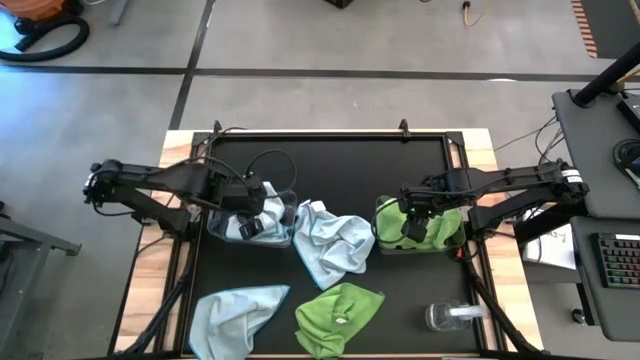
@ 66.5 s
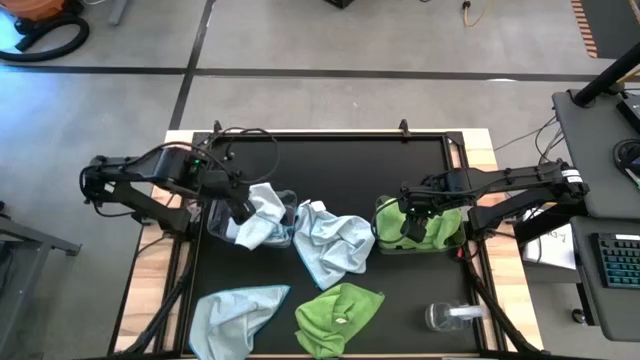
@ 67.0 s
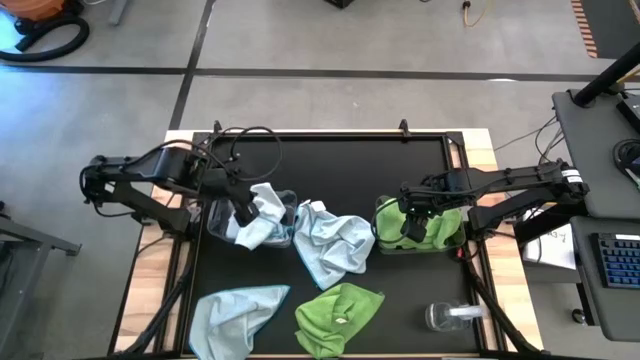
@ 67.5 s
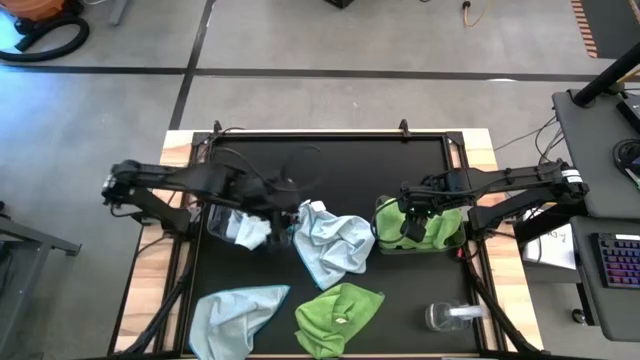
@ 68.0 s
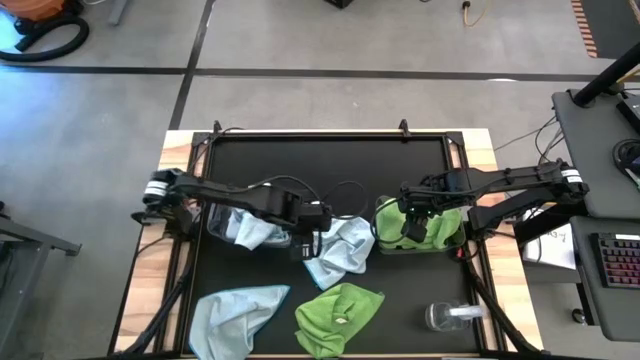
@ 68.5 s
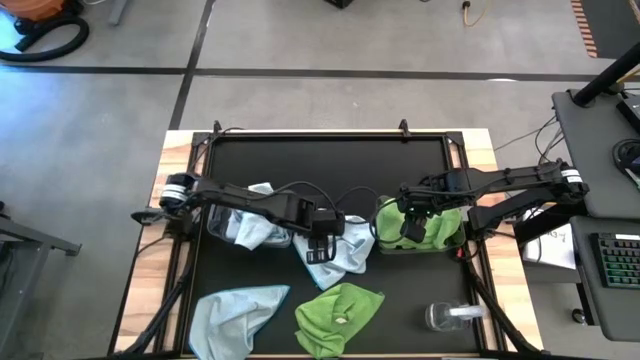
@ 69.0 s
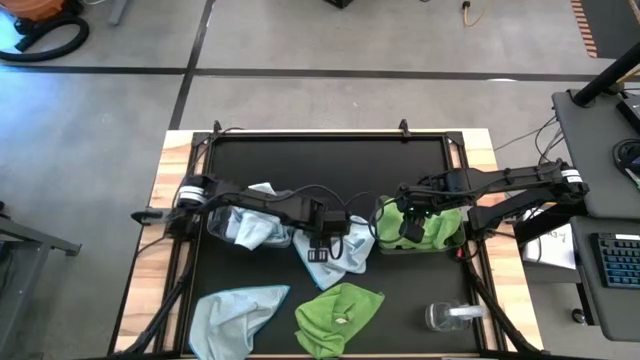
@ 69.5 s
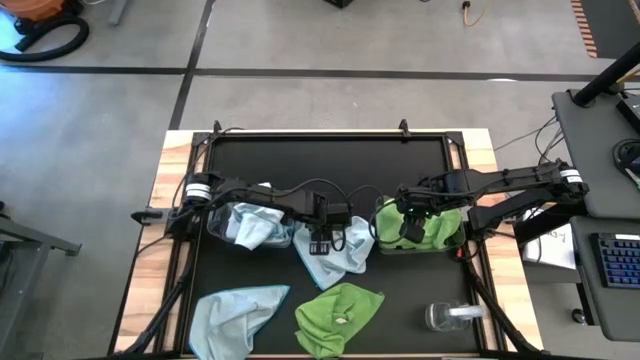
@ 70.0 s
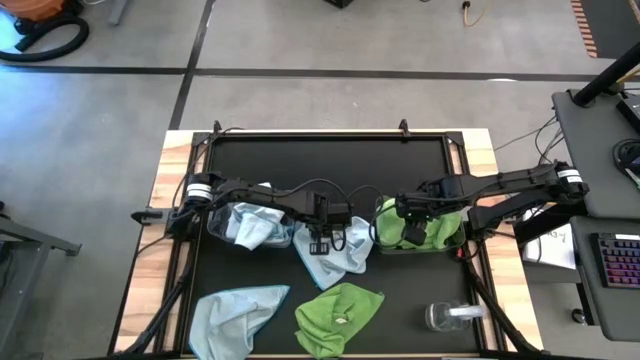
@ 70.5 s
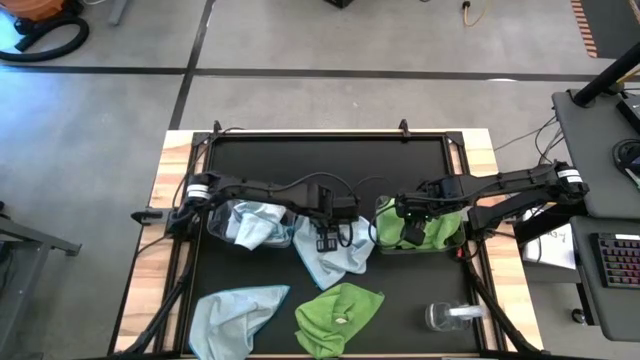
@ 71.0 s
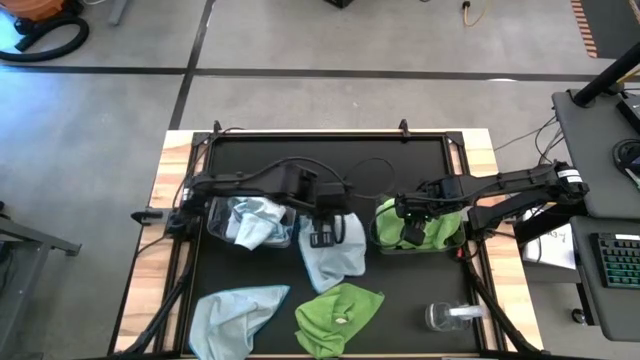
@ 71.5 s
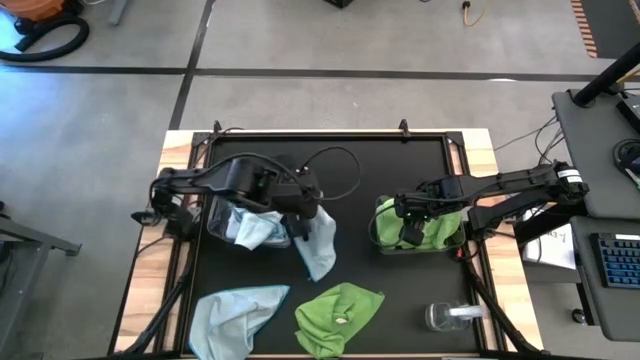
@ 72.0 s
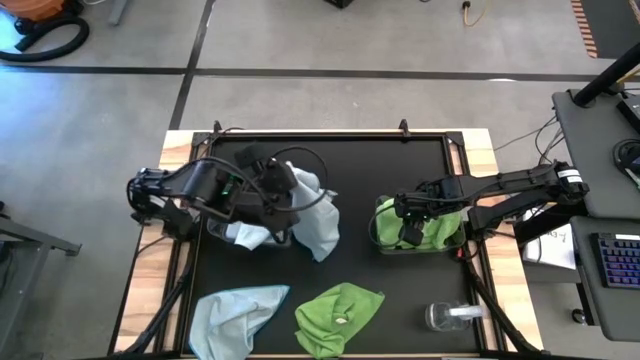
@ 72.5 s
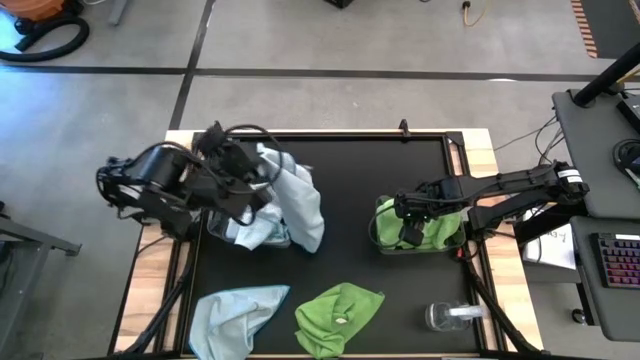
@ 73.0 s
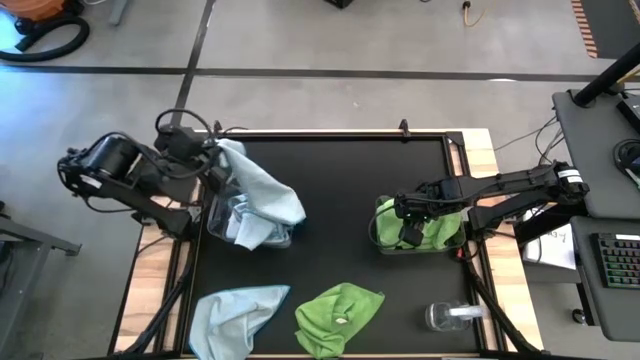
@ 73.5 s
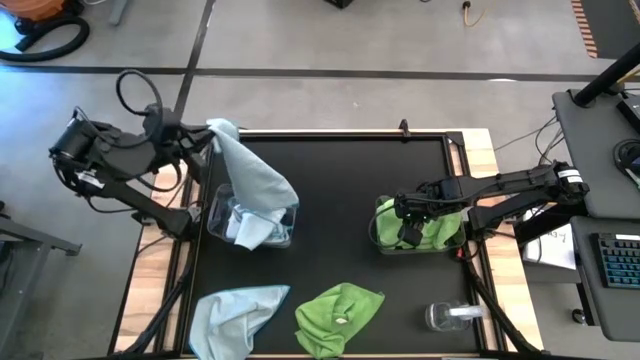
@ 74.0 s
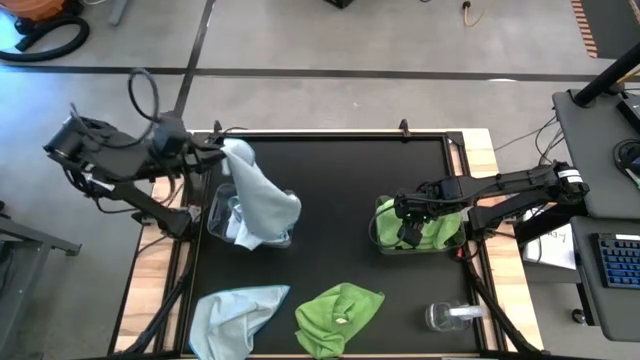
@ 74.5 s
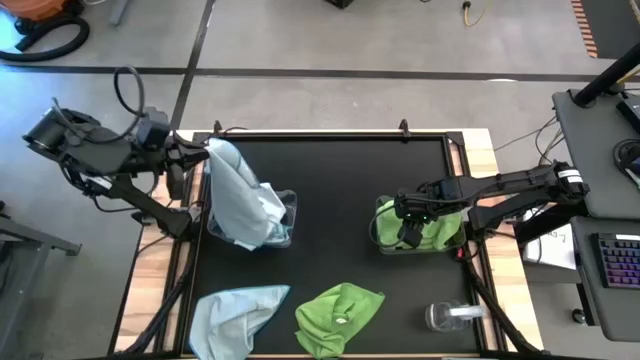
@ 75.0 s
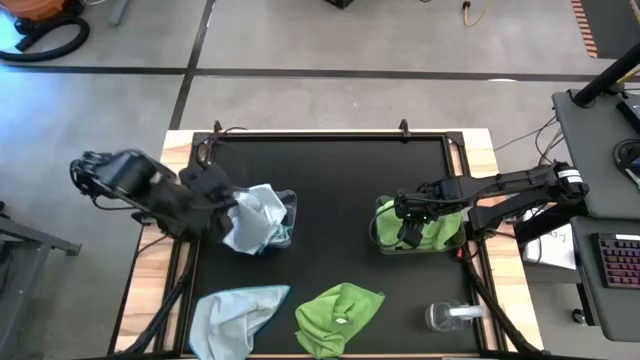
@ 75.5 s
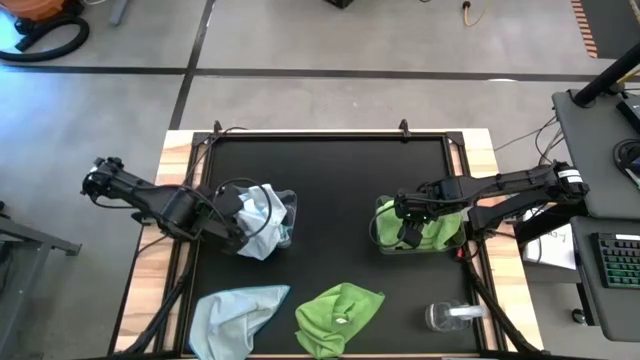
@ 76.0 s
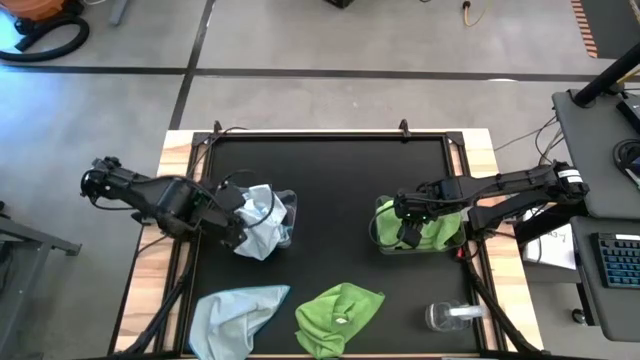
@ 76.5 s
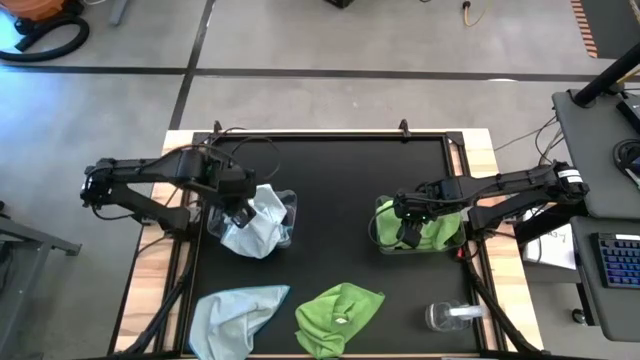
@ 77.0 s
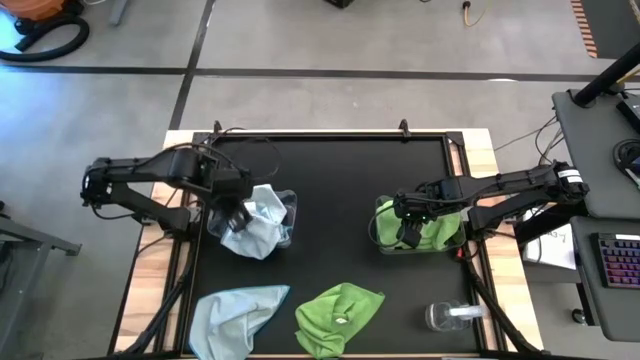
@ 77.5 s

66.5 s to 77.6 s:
Task: Sort microfiber towel by color & place in baskets
Put the blue towel into the left transparent bin

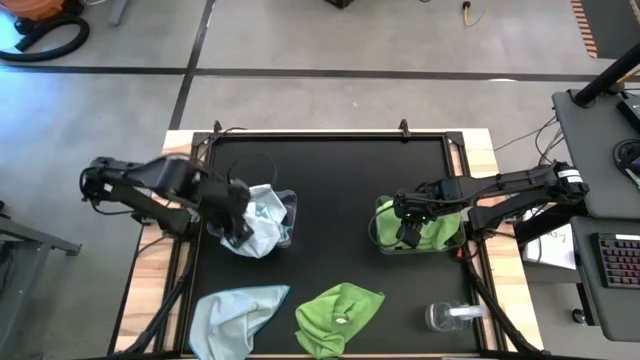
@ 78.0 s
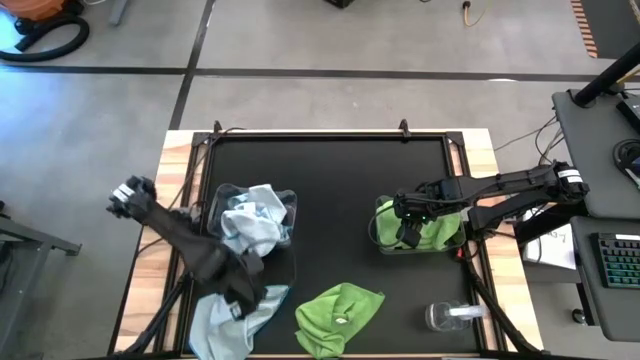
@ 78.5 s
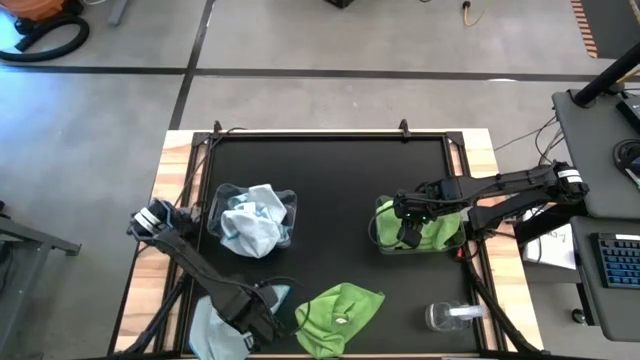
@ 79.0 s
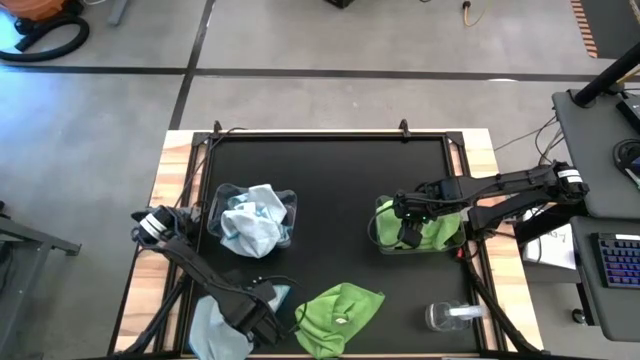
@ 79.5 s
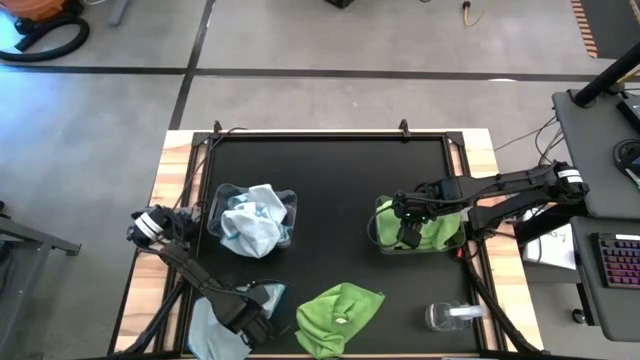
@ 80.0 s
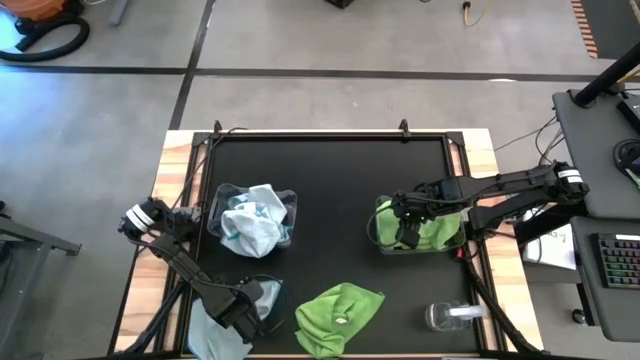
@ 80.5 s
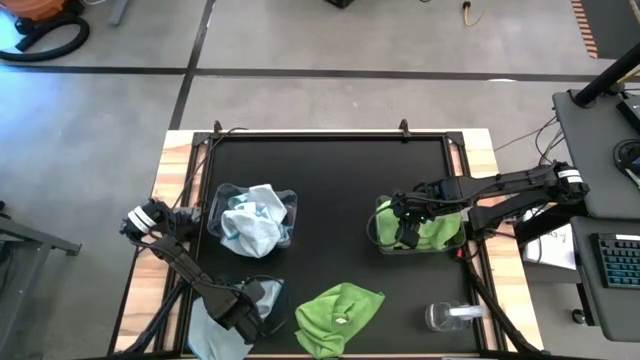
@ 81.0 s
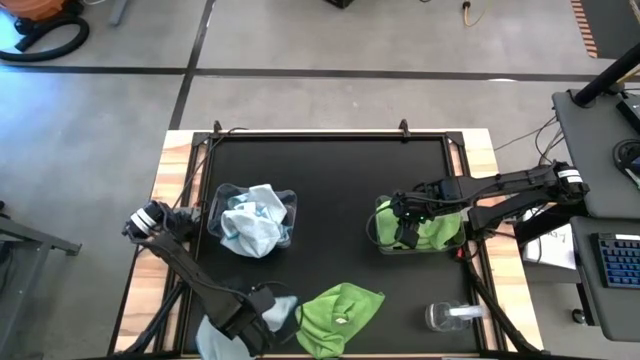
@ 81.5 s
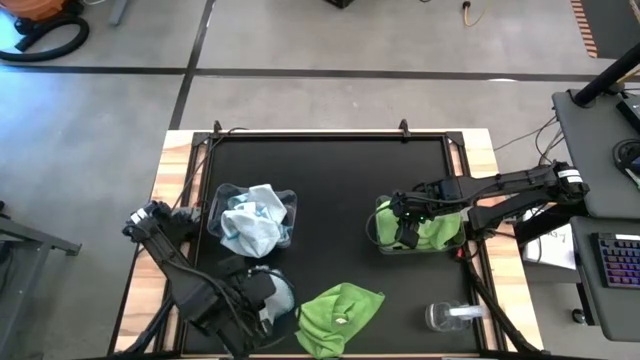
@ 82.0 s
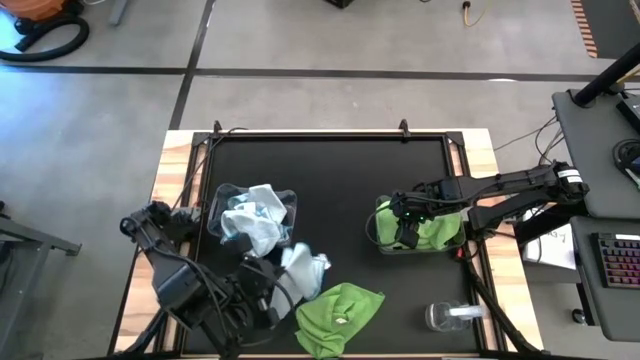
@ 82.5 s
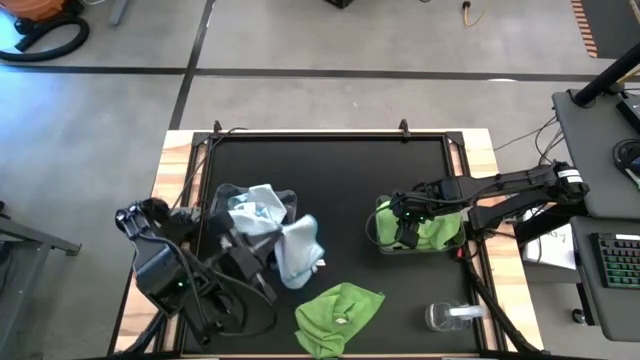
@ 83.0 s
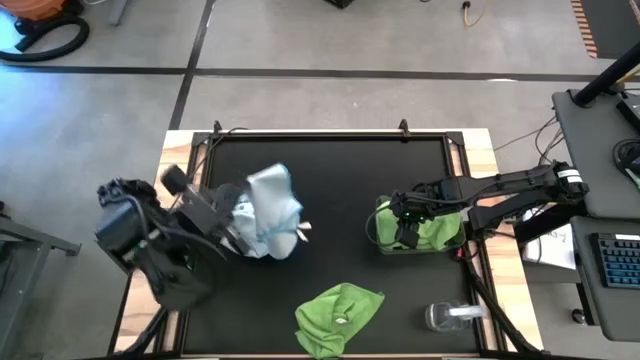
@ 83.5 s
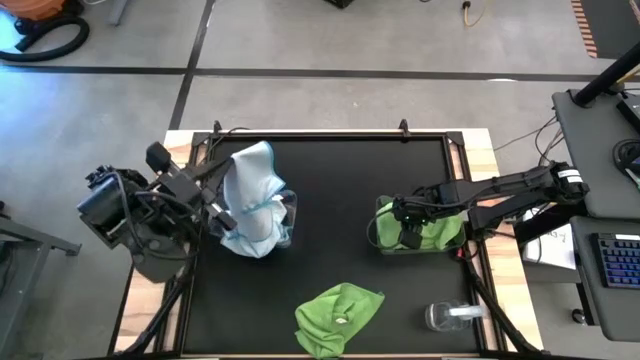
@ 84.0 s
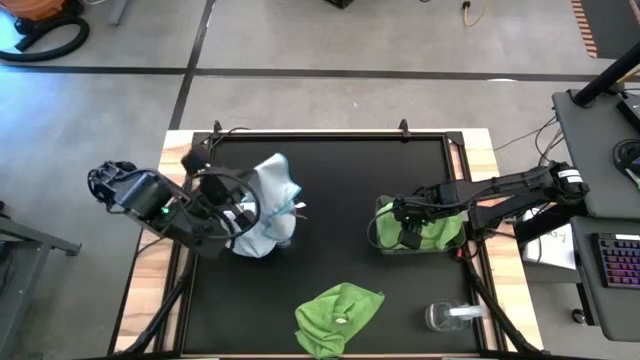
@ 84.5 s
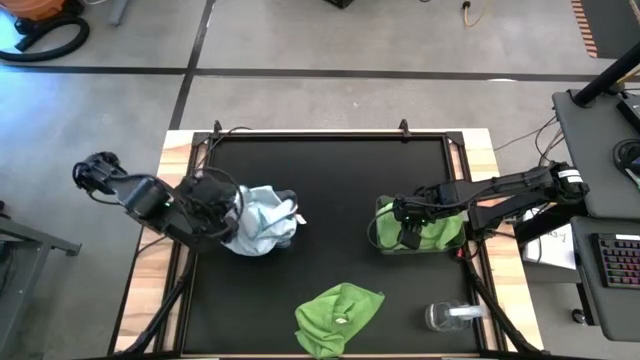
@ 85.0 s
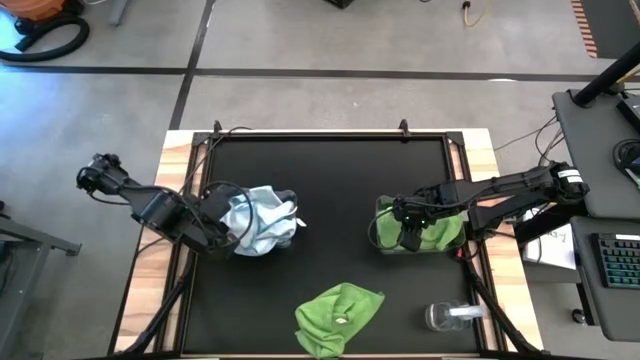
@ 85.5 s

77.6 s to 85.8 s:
Put the blue towel into the left transparent bin

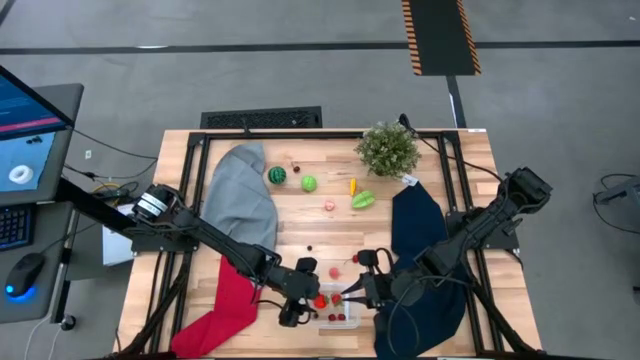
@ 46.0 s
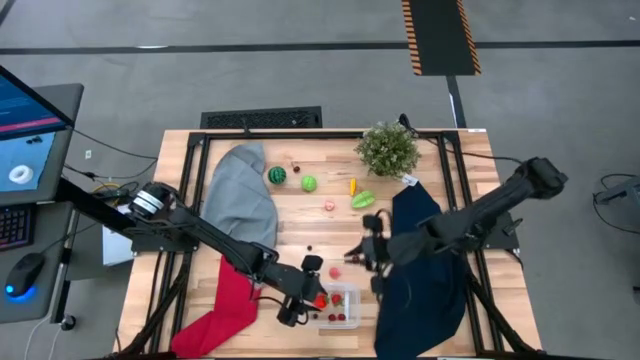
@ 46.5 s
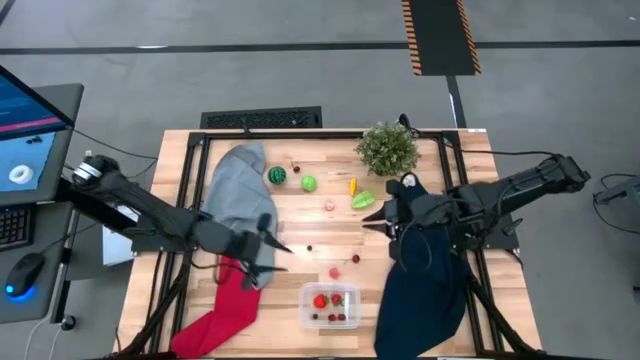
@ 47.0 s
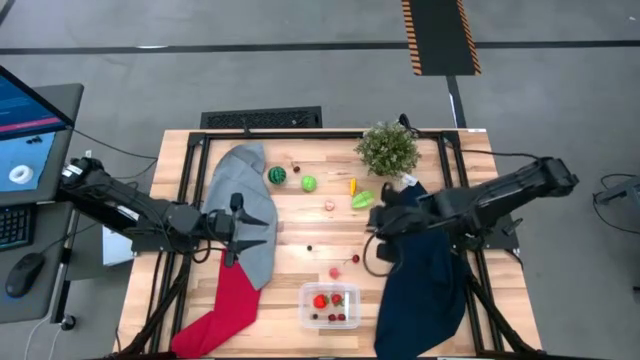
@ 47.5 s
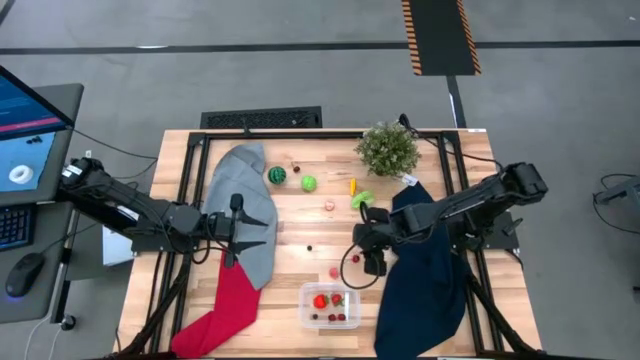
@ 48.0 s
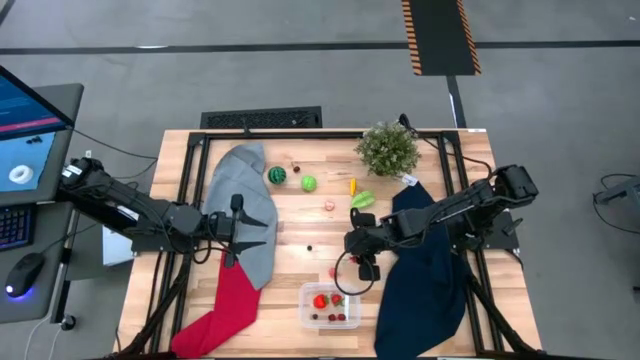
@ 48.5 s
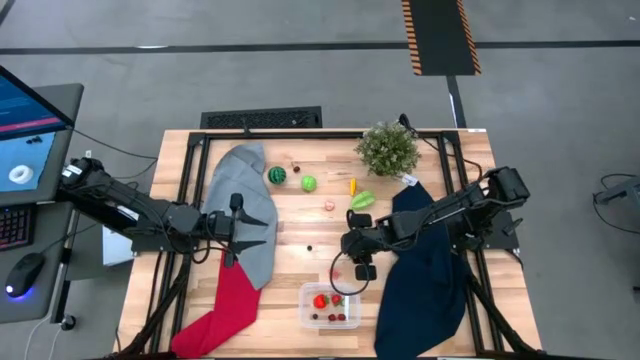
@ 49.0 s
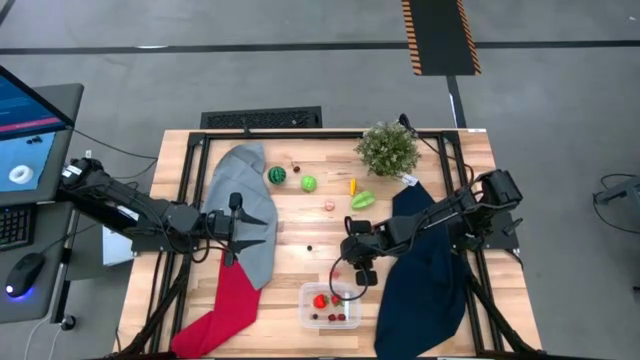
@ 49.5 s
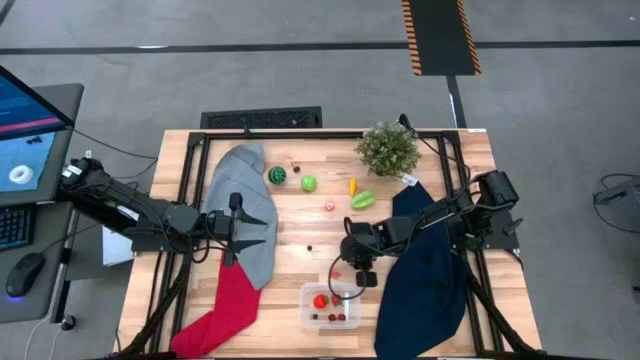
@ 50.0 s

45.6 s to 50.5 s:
Task: Pick and placing Produce into tupperware
Put the cherry into the transparent bin
